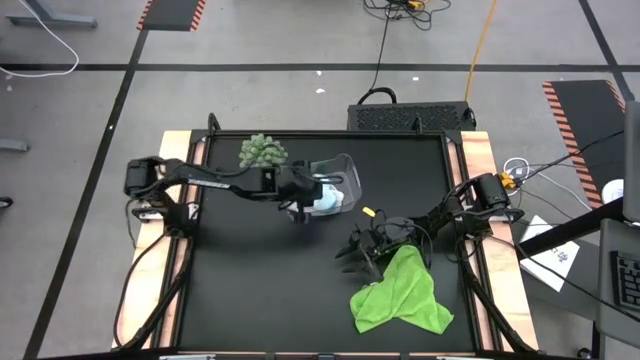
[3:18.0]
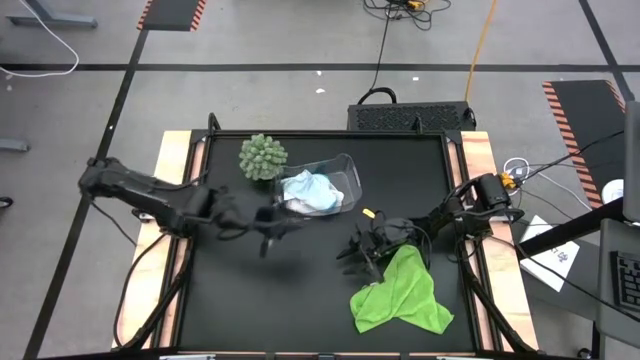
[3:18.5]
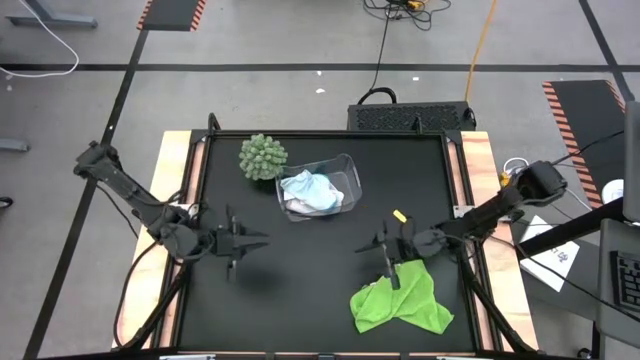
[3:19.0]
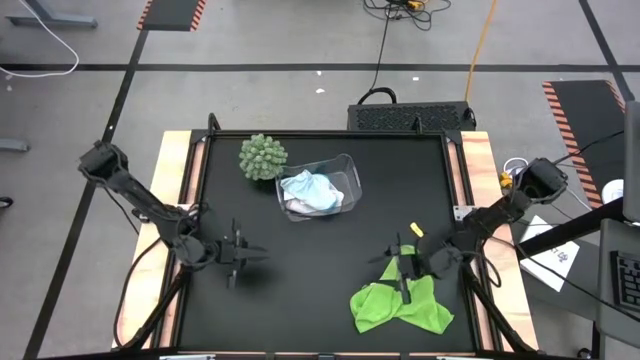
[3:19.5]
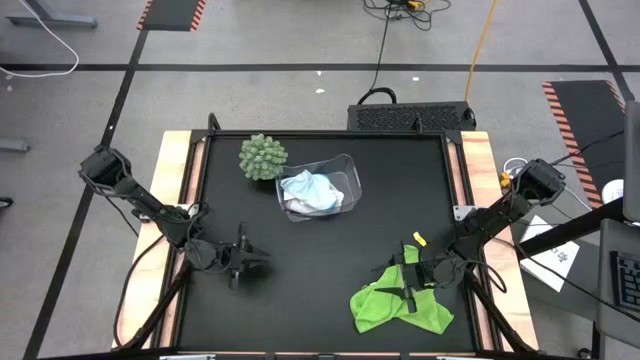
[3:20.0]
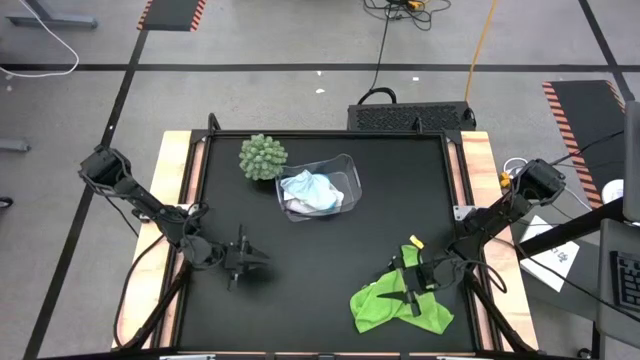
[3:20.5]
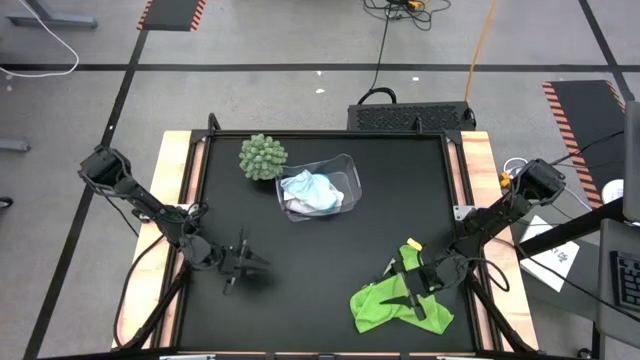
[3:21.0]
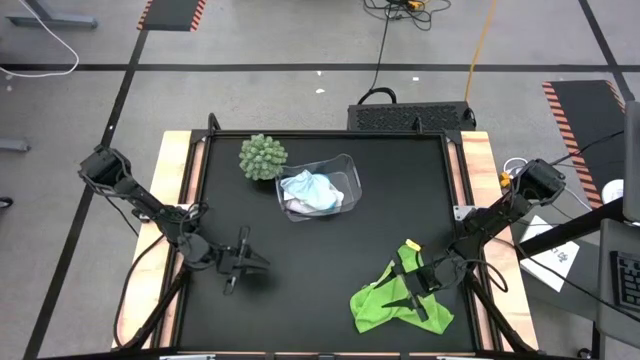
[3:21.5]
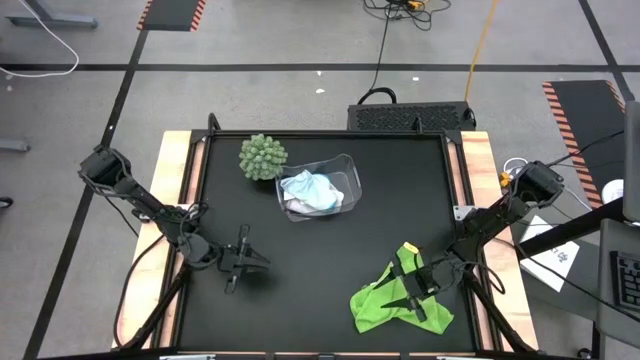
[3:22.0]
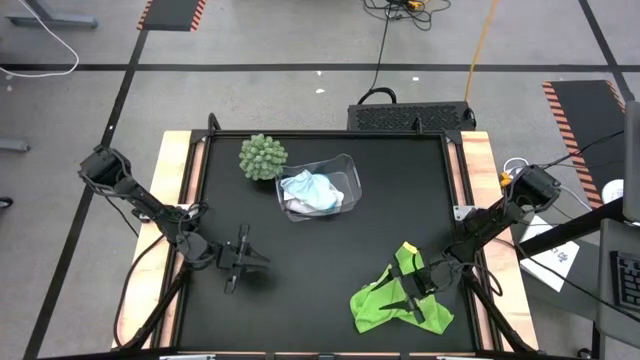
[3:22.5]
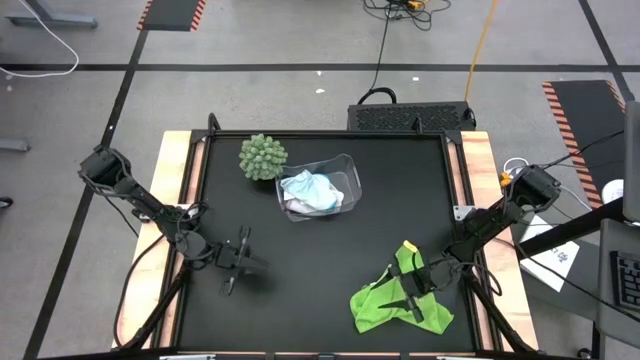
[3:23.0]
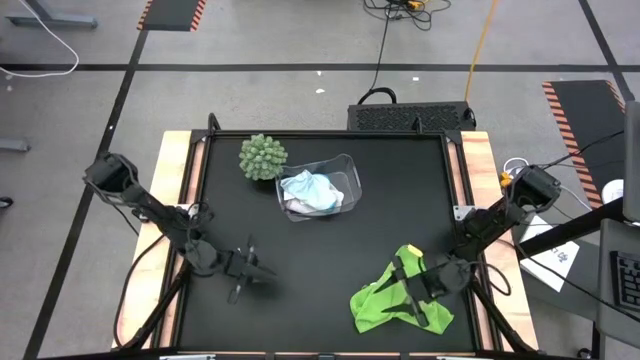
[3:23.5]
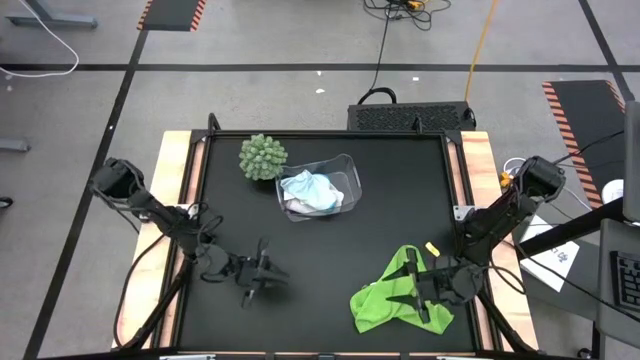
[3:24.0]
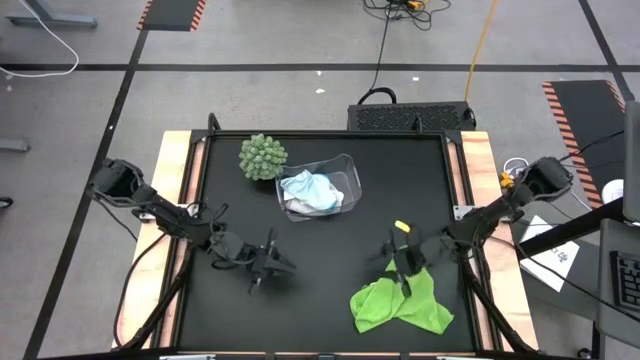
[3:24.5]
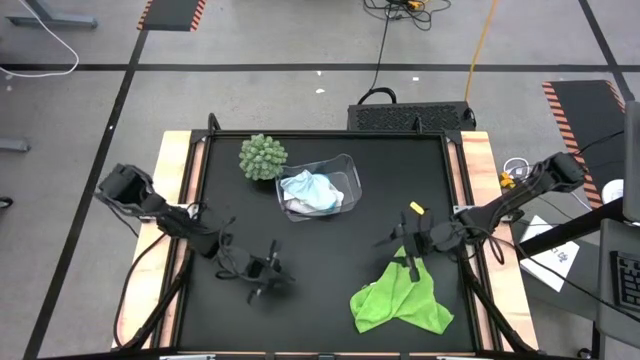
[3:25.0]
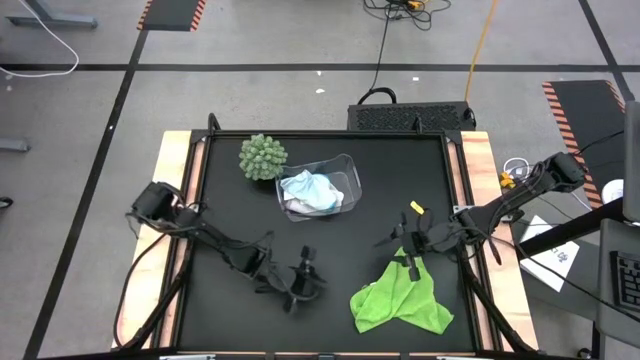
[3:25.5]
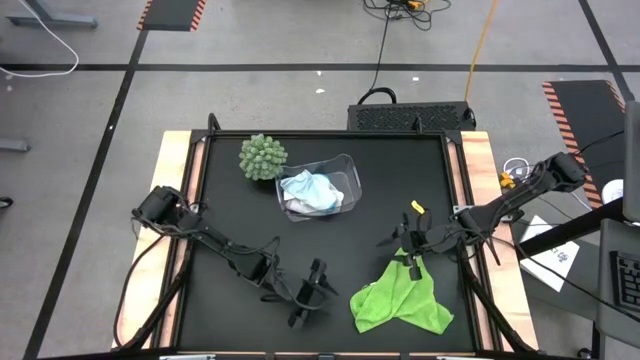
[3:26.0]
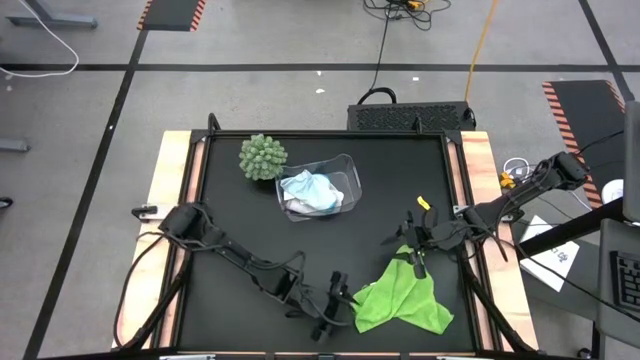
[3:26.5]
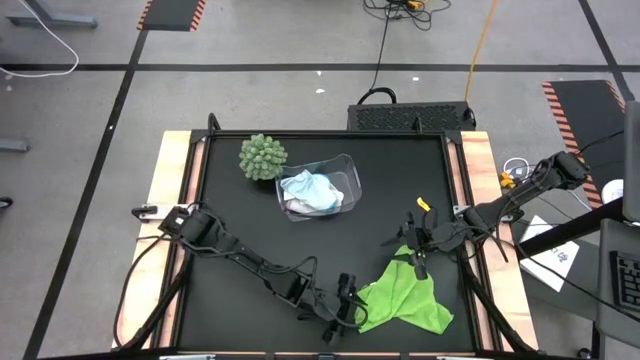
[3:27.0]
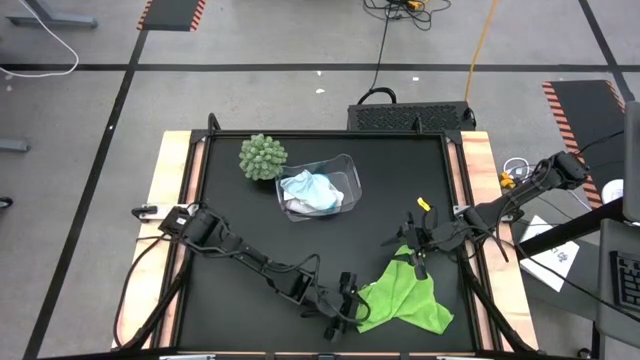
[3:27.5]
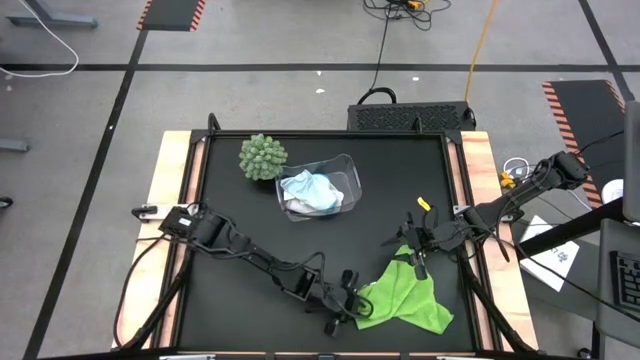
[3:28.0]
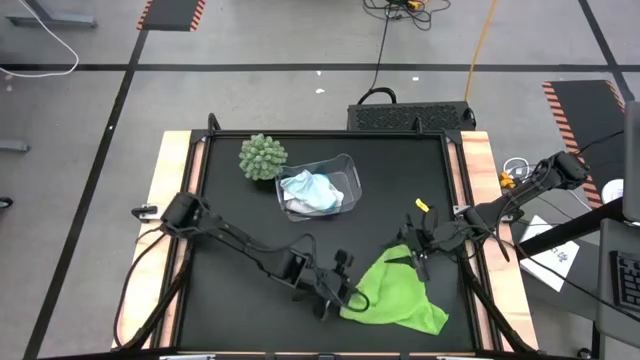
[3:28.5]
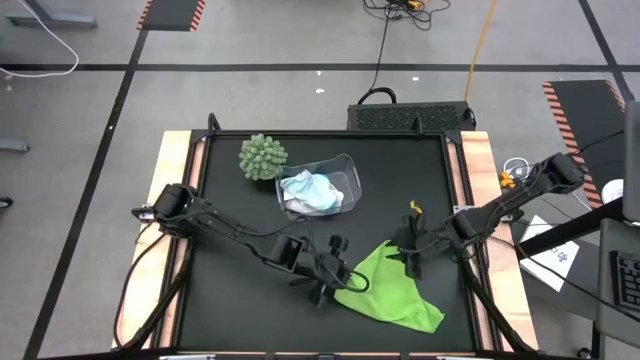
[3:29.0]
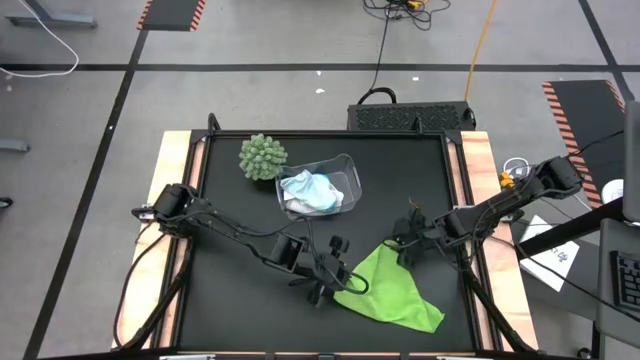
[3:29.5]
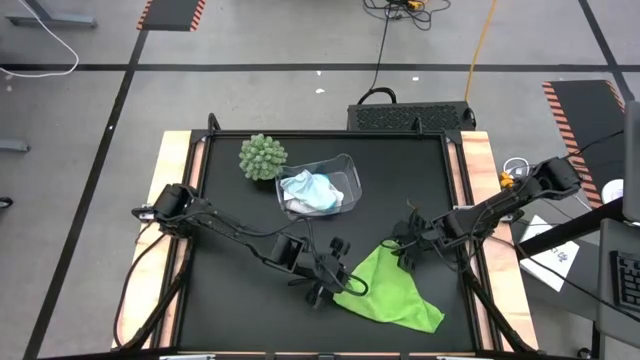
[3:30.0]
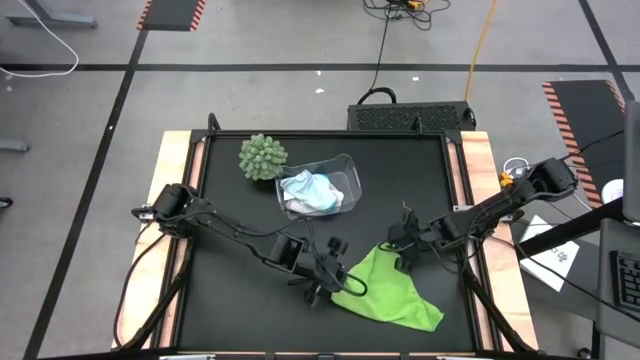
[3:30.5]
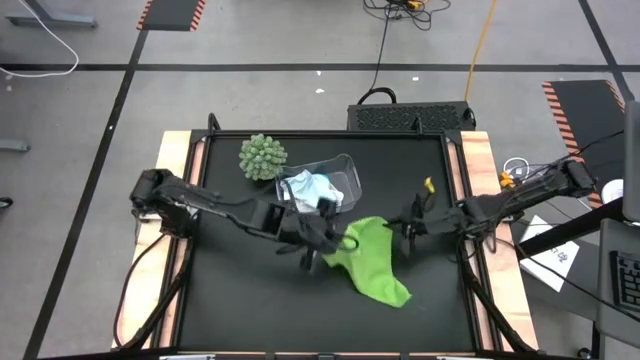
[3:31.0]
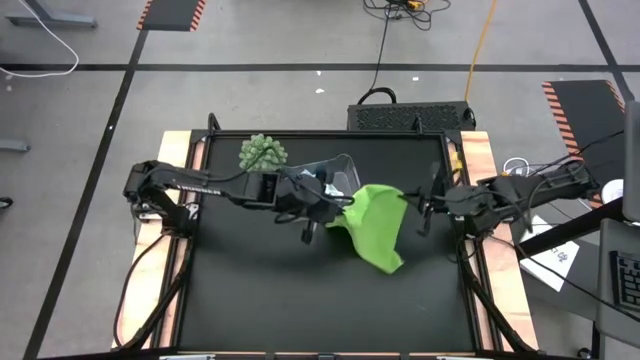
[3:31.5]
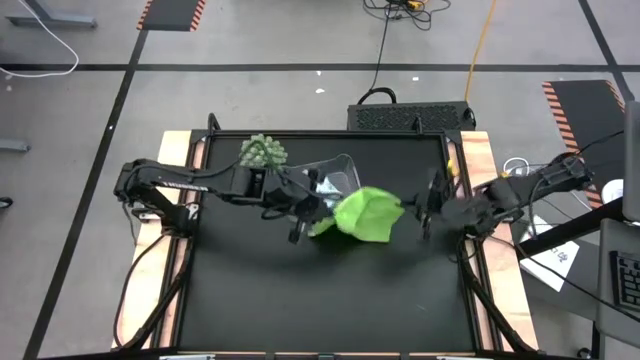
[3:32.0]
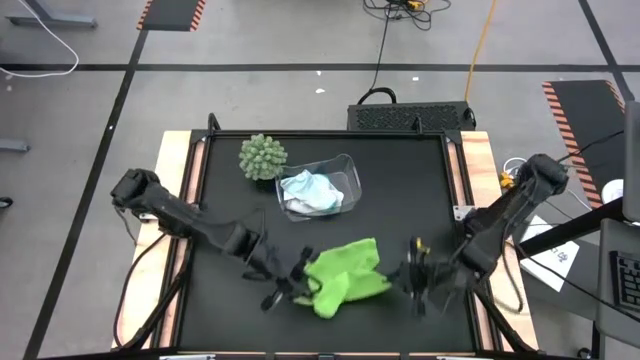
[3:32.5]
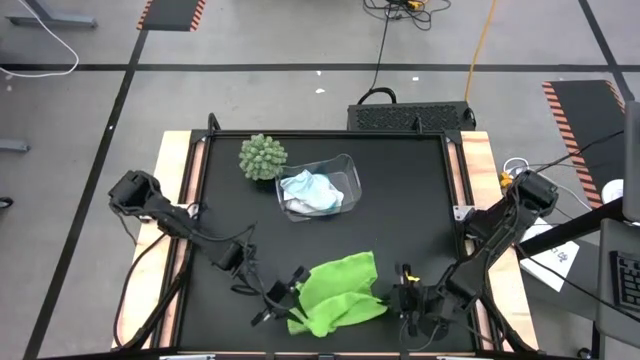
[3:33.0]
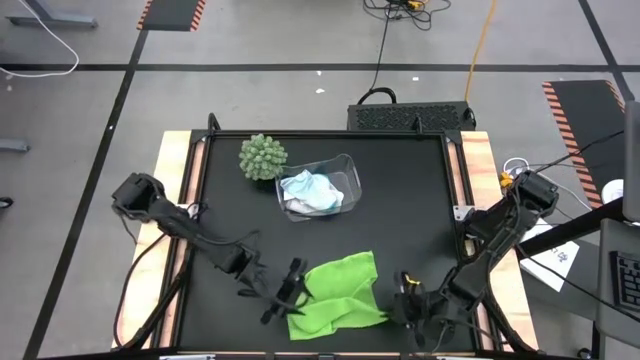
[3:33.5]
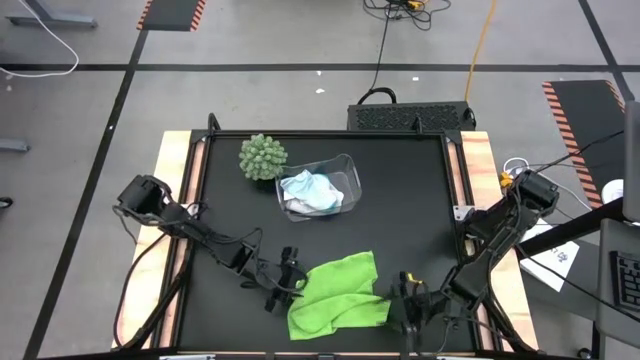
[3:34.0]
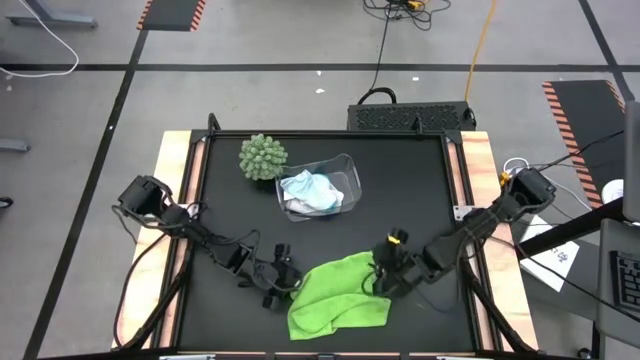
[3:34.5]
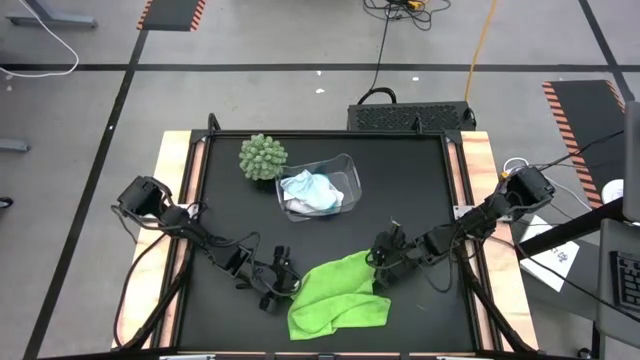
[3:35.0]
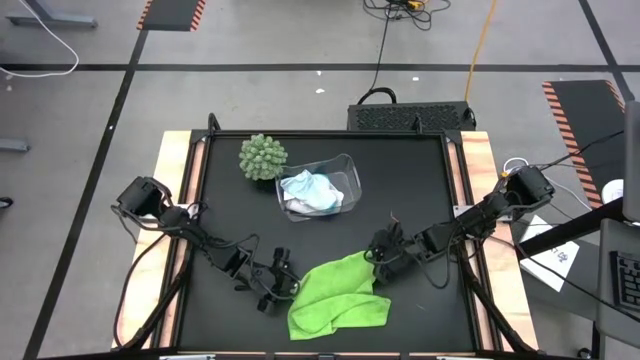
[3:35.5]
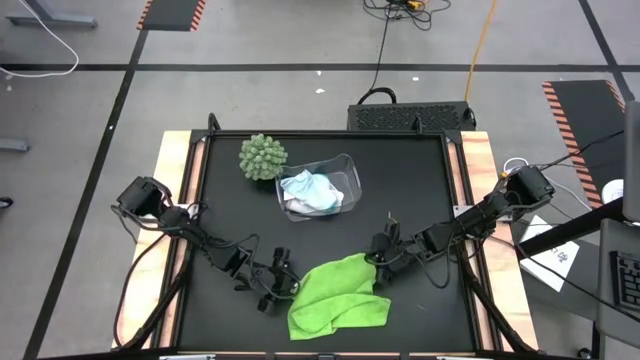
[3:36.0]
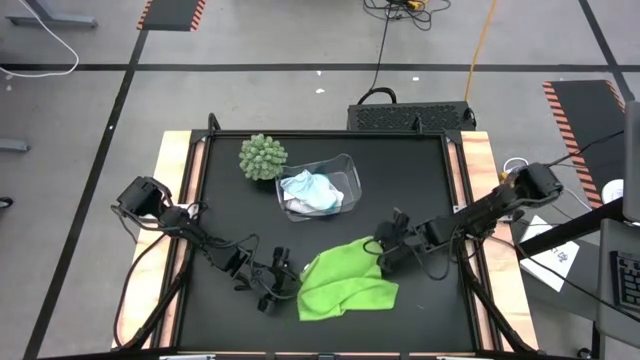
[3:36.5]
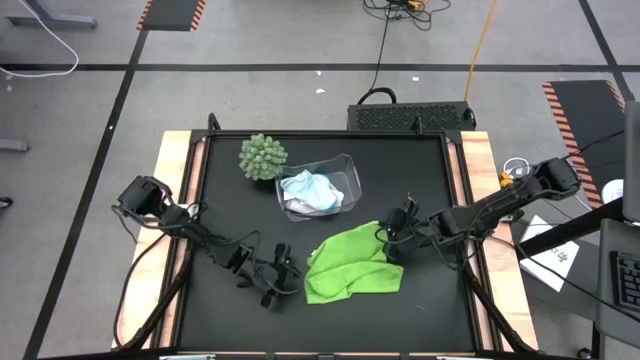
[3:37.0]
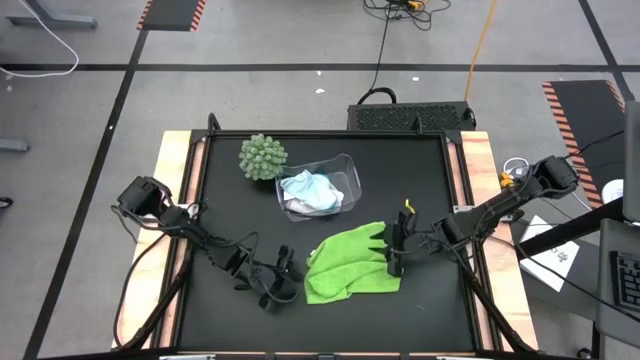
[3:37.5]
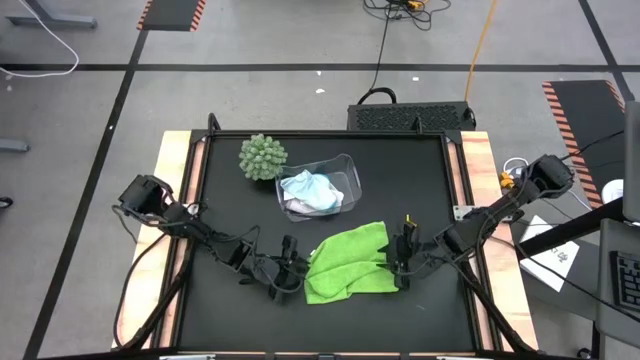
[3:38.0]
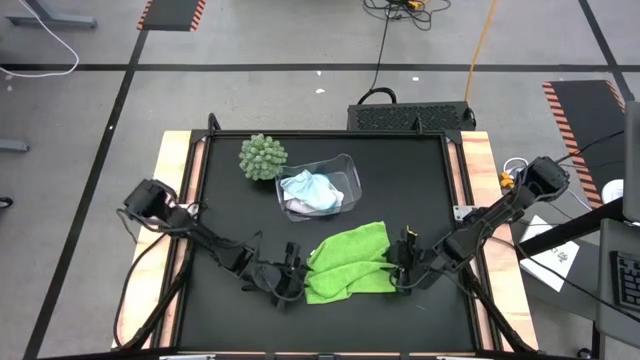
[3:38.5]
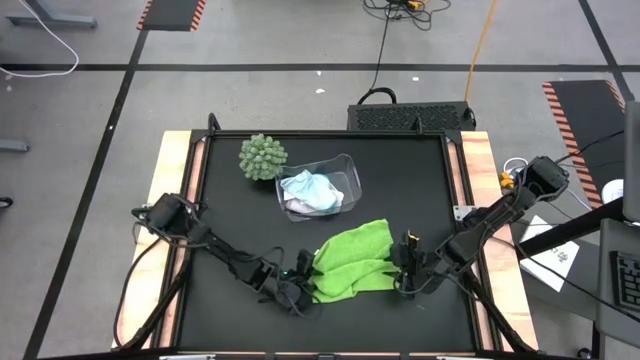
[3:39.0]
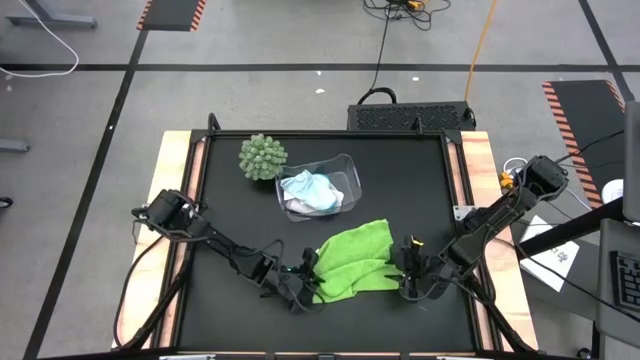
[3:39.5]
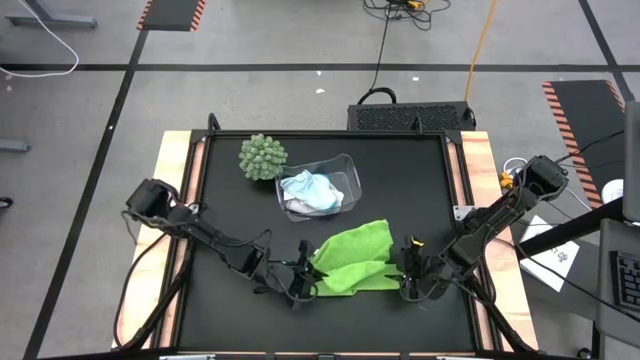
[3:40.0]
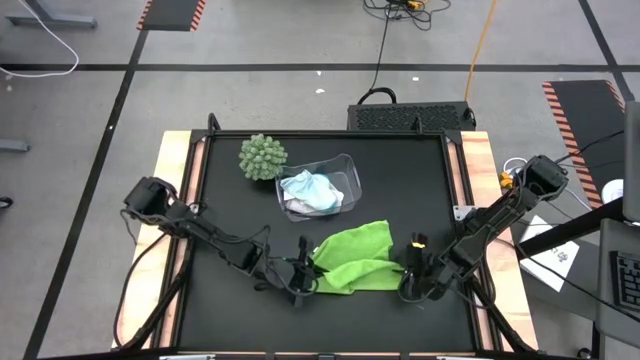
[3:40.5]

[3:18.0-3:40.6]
Task: Fold microfiber towels
Fold the green towel
